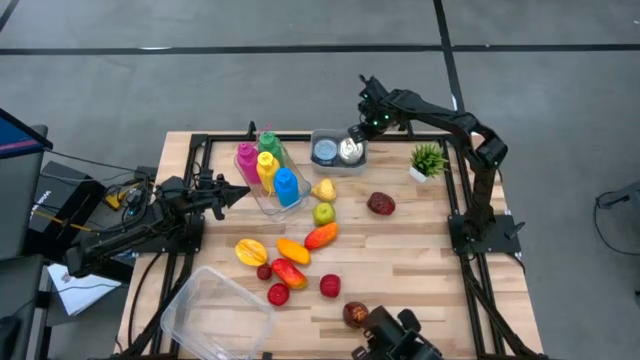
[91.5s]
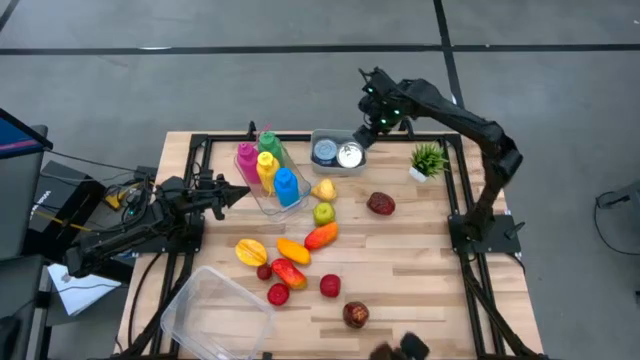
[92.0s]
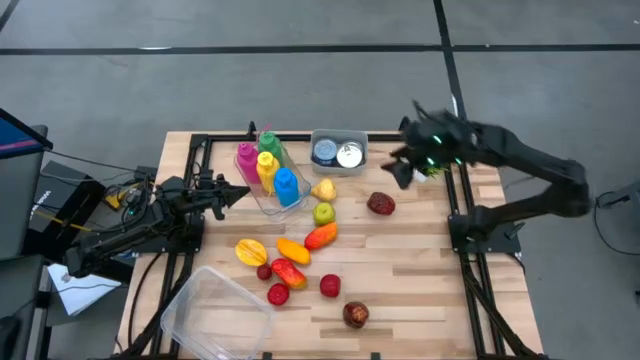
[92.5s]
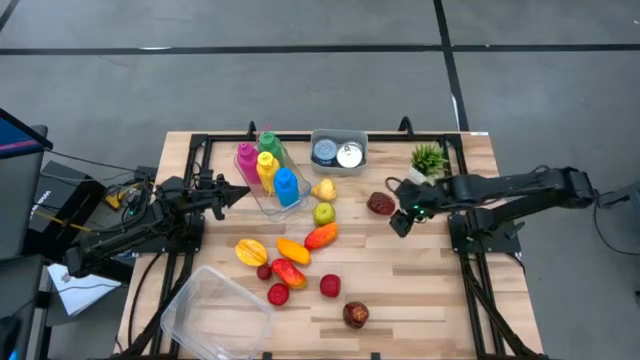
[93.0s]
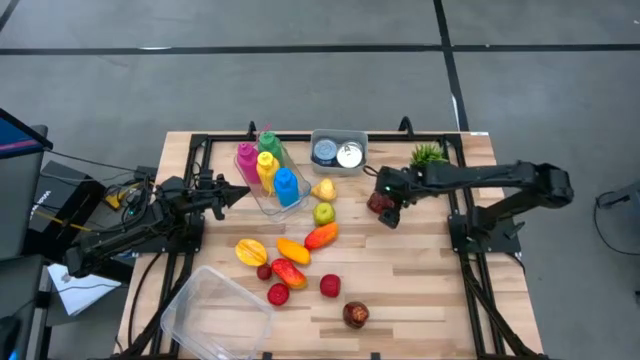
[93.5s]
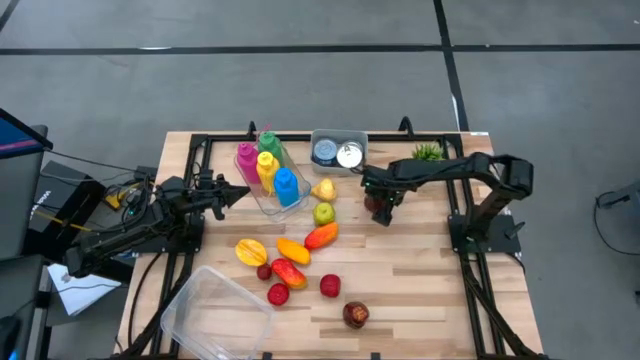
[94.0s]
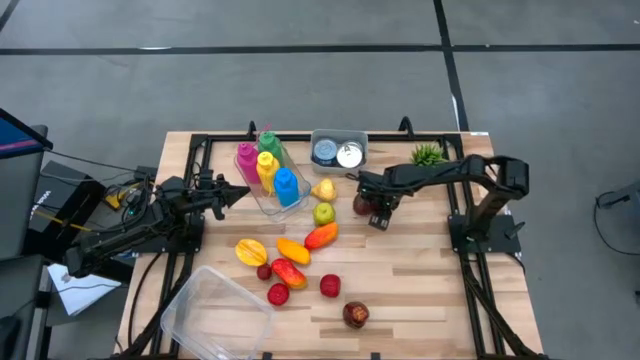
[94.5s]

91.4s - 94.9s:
Task: Pick & Place Food Item
Put the red apple into the white bin

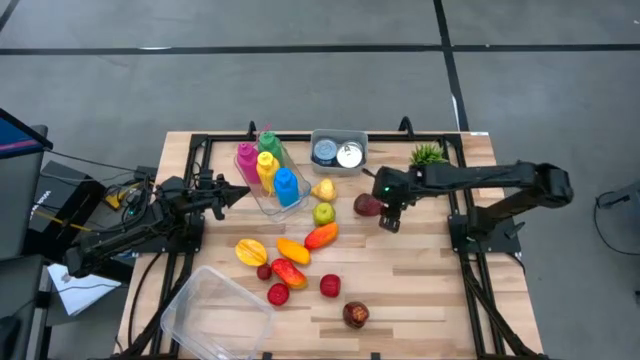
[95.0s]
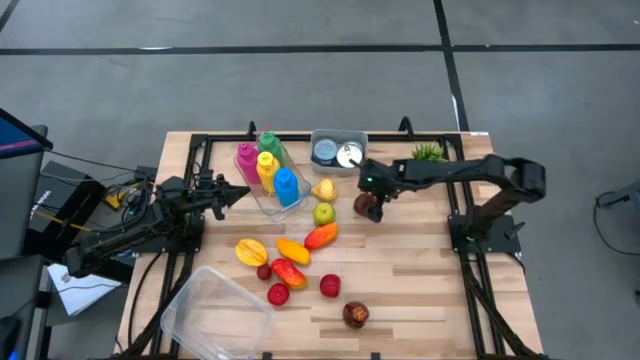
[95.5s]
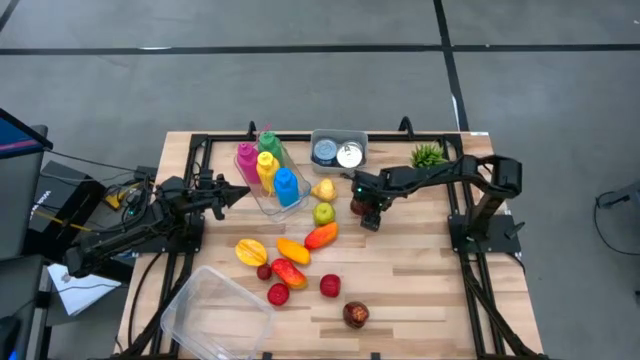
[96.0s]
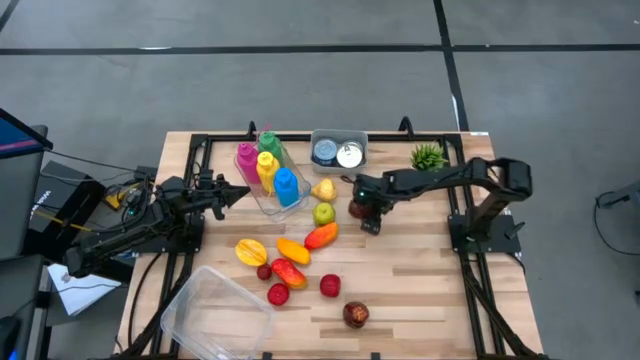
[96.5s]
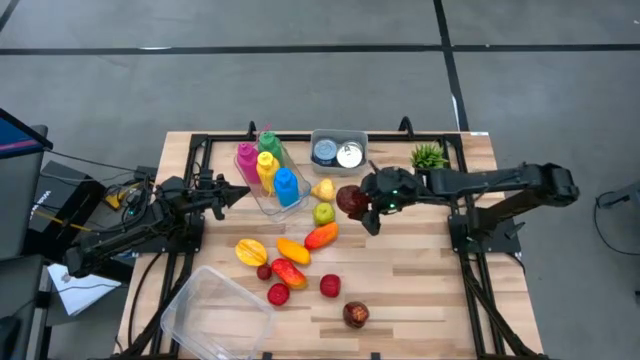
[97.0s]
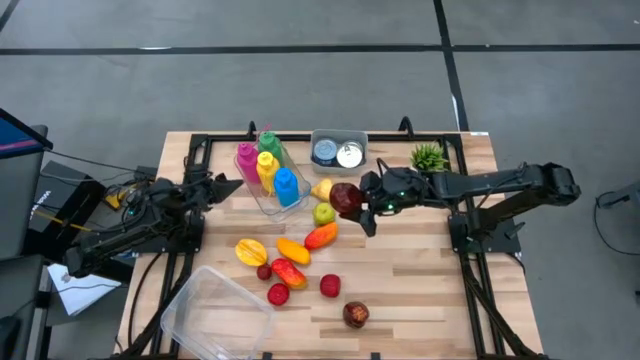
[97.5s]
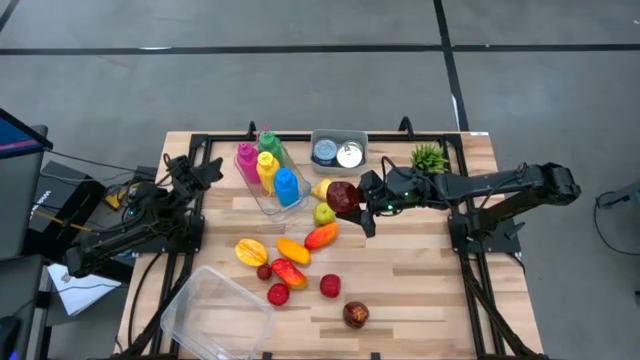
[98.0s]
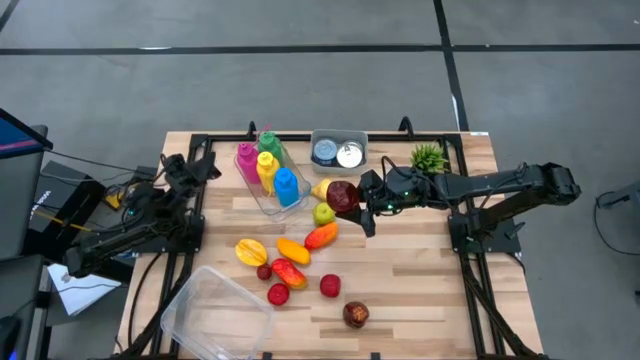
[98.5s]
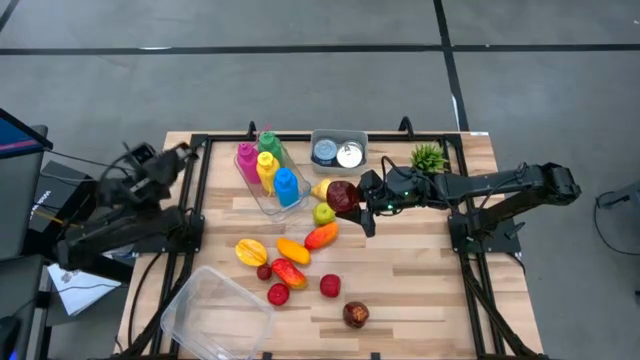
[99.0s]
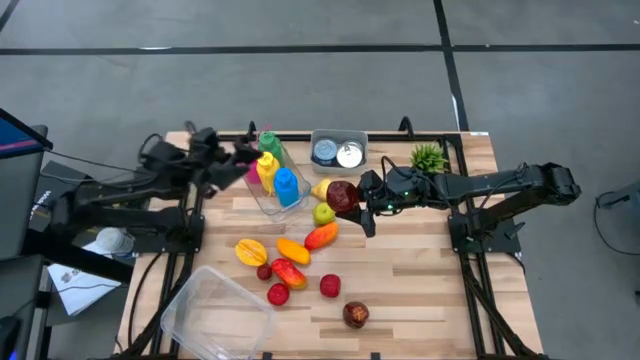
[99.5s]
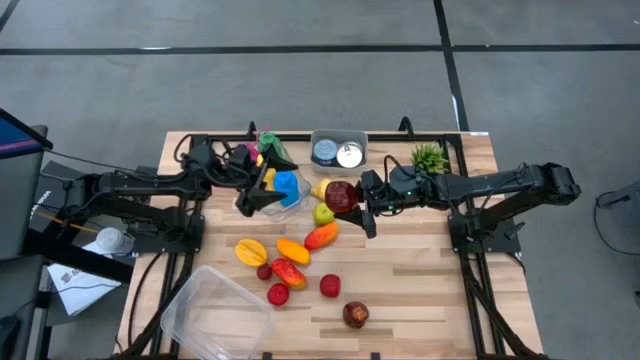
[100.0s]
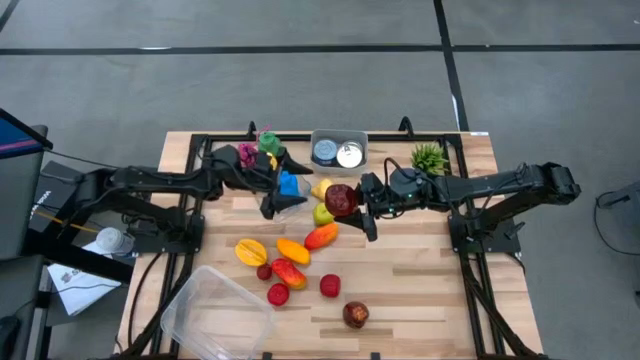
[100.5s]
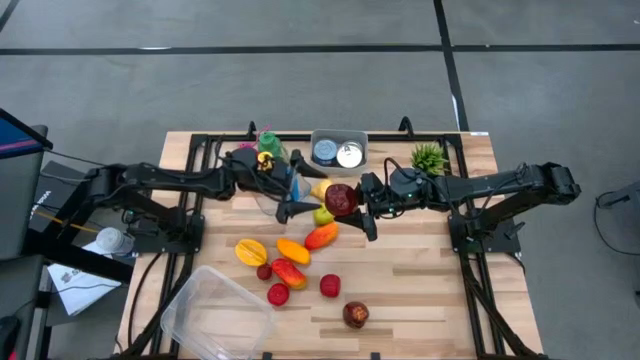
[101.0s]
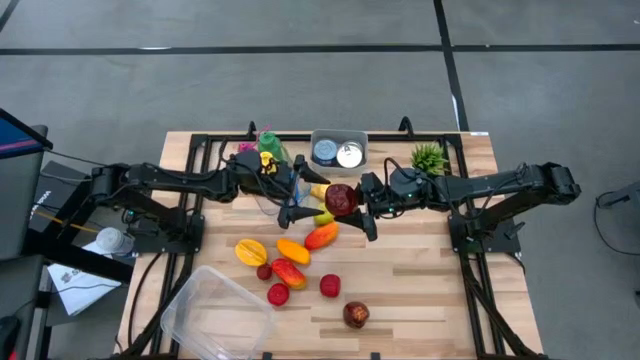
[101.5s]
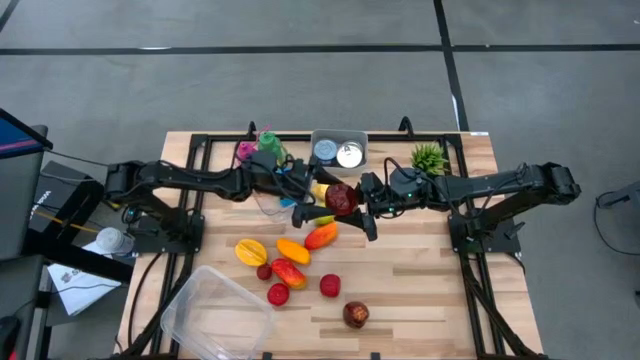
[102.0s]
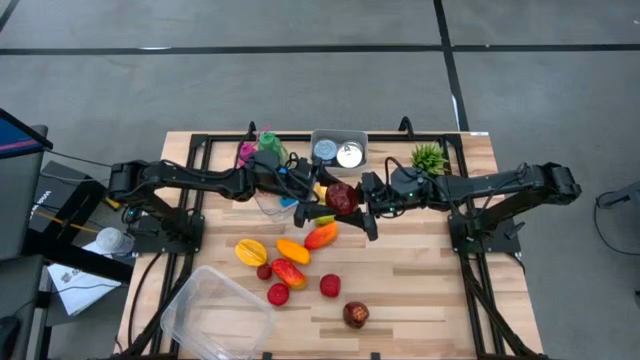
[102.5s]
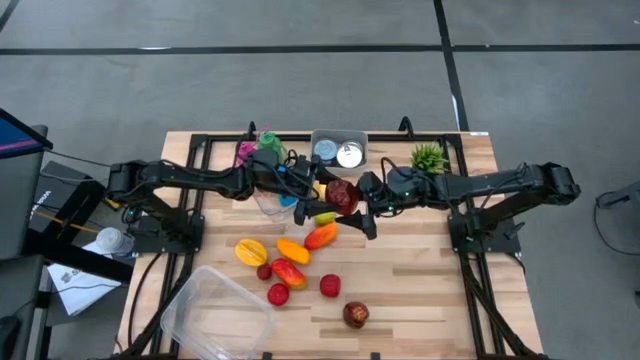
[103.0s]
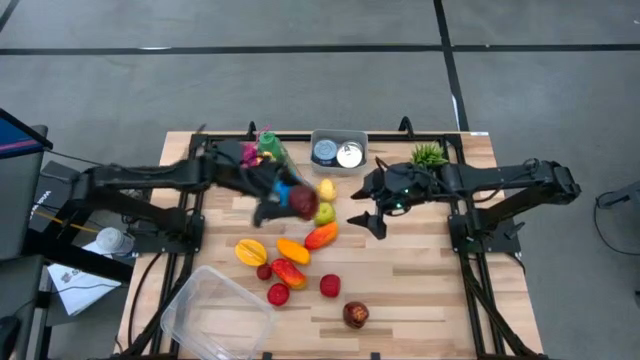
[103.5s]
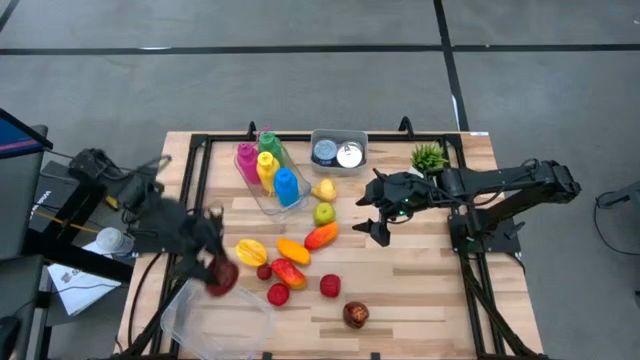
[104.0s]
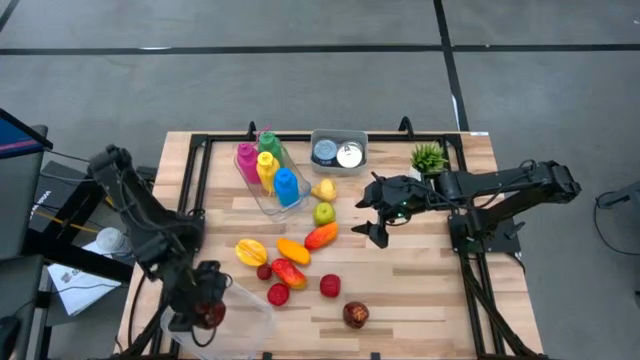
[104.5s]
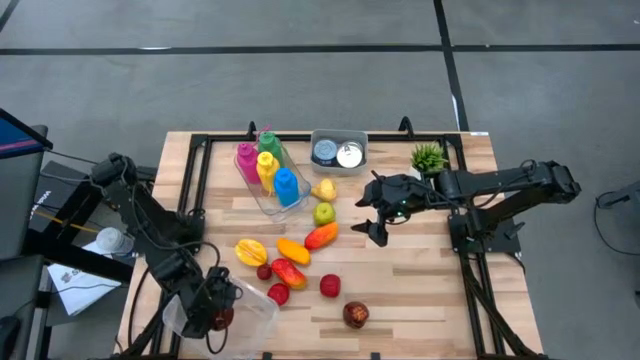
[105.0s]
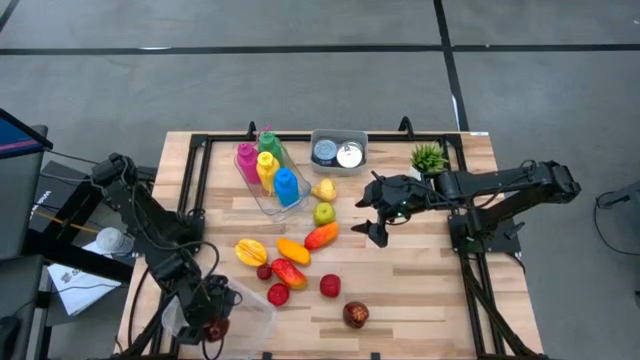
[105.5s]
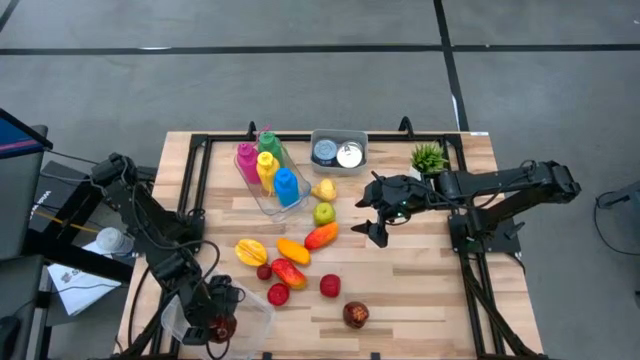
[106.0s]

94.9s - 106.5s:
Put the top red apple into the white bin

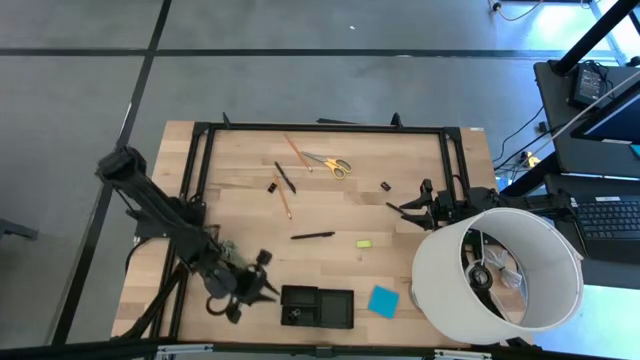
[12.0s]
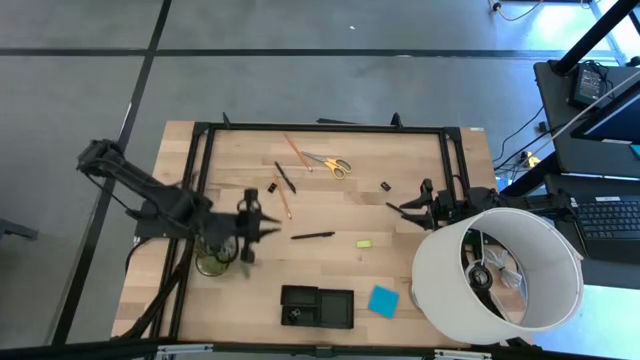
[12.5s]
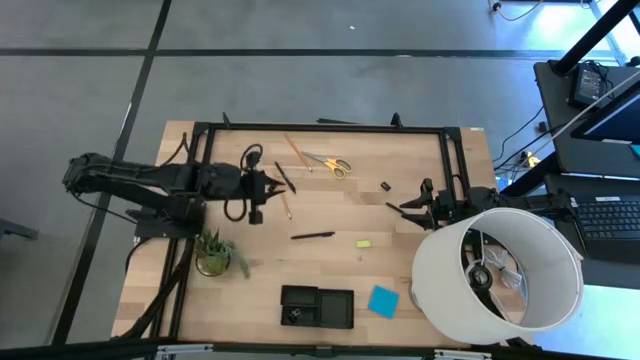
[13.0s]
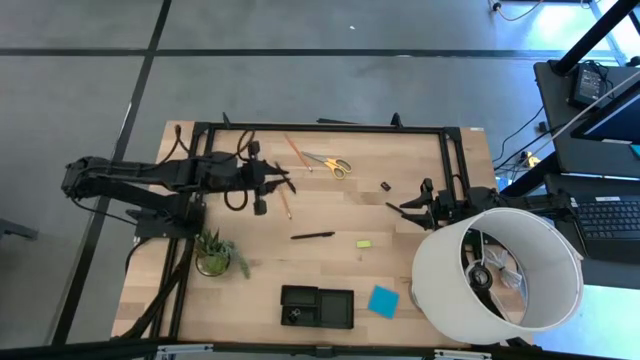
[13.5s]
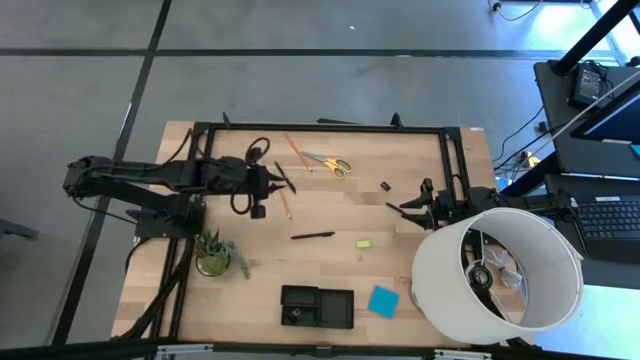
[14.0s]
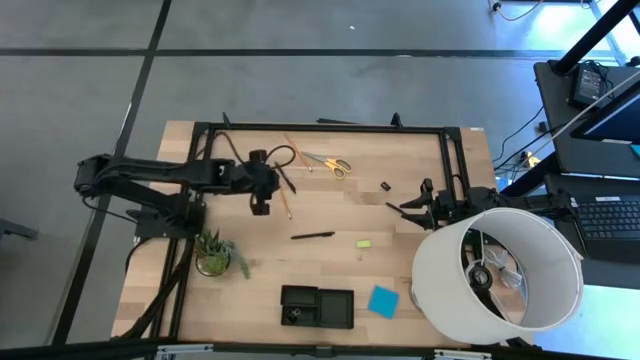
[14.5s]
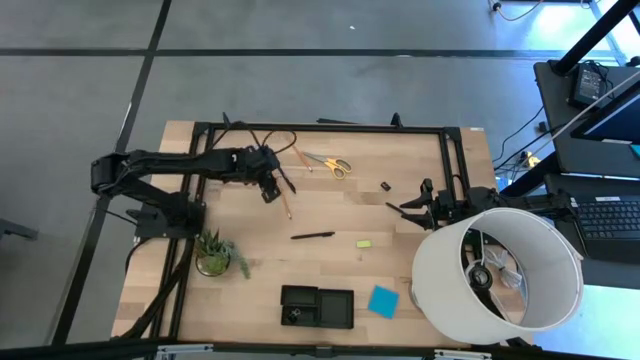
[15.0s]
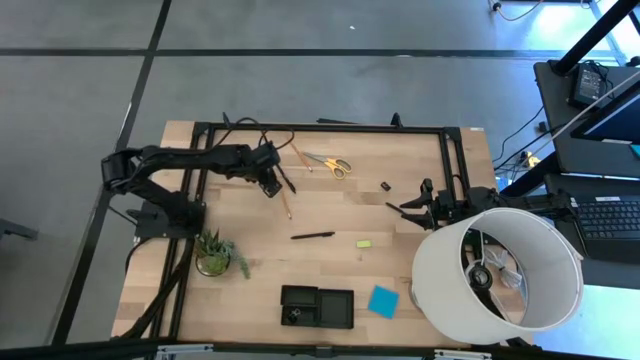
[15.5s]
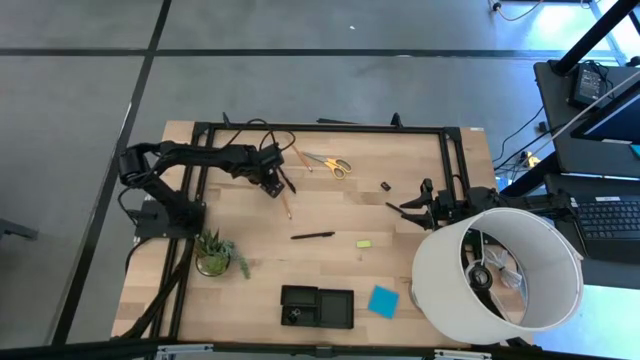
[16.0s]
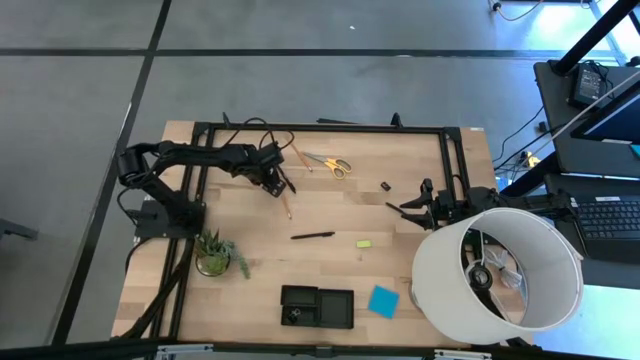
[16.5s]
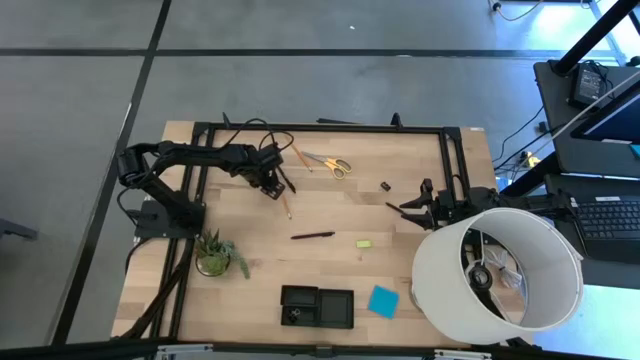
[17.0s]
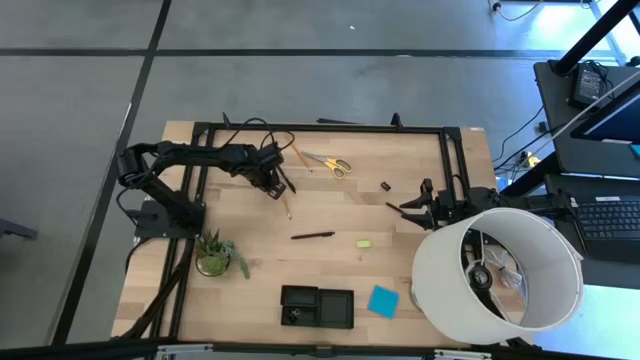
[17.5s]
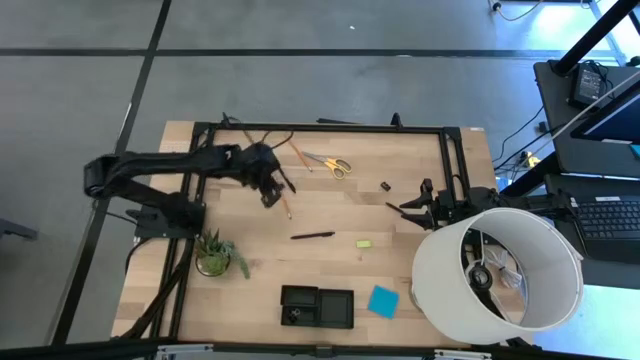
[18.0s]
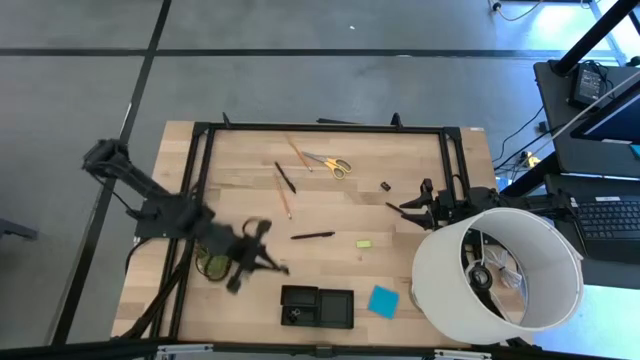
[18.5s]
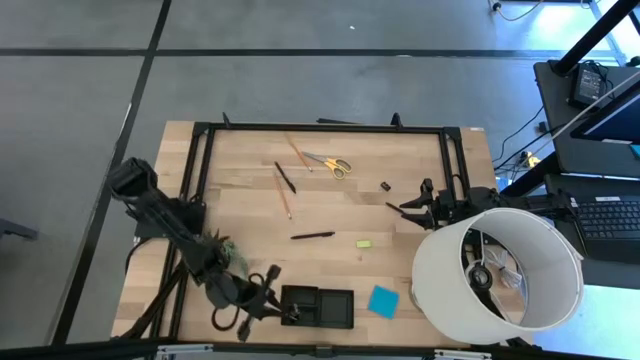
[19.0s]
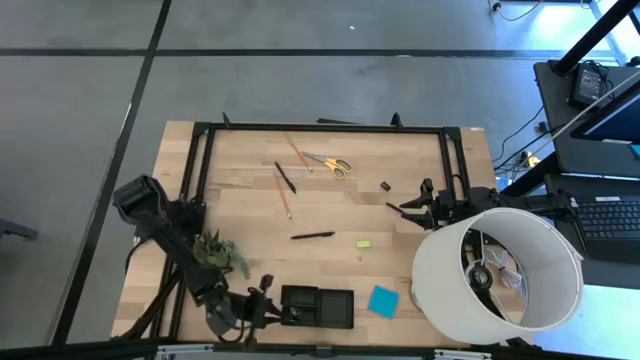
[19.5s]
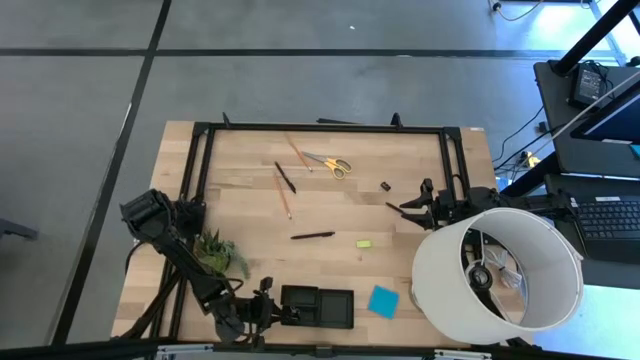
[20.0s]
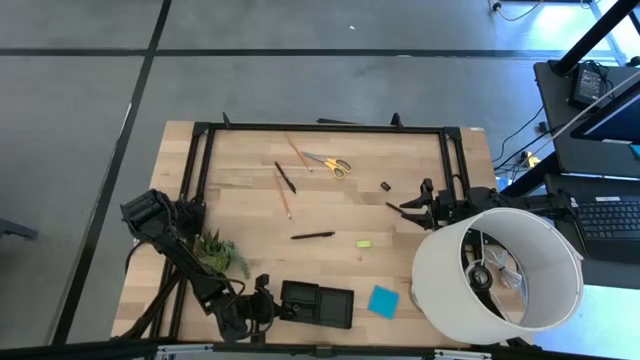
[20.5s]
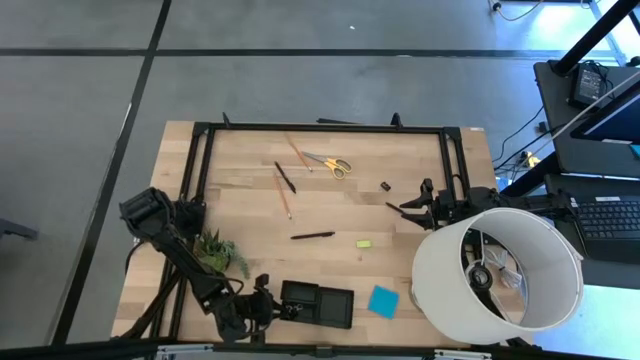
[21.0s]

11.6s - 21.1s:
Task: Pick and place office supplies into organizer
Put the left black binder clip into the black desk organizer
